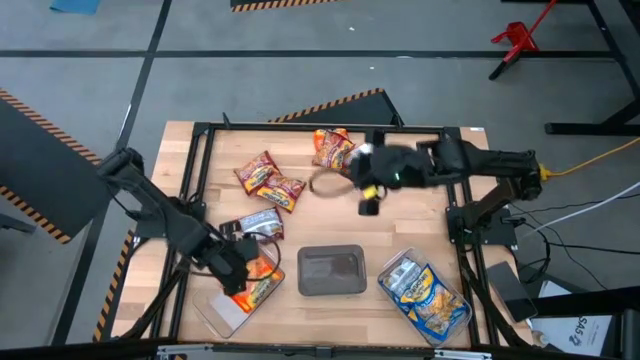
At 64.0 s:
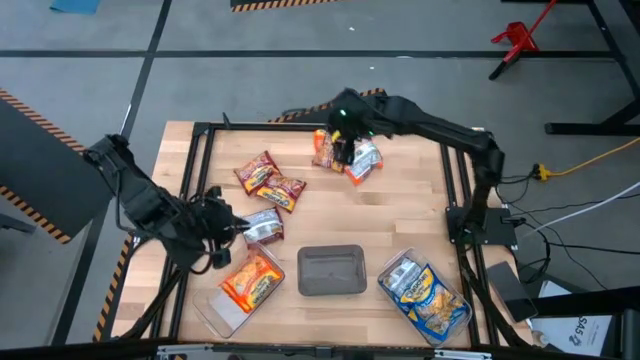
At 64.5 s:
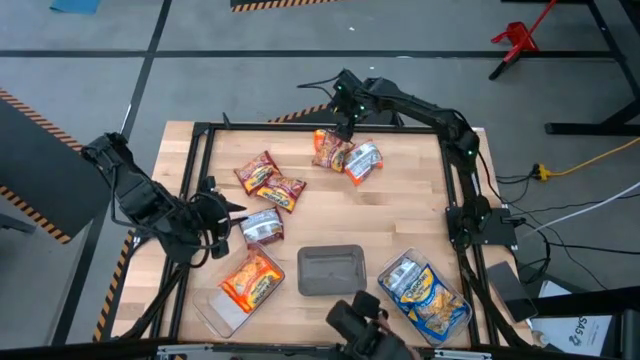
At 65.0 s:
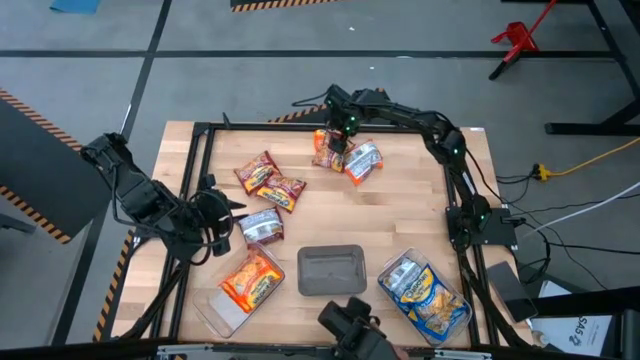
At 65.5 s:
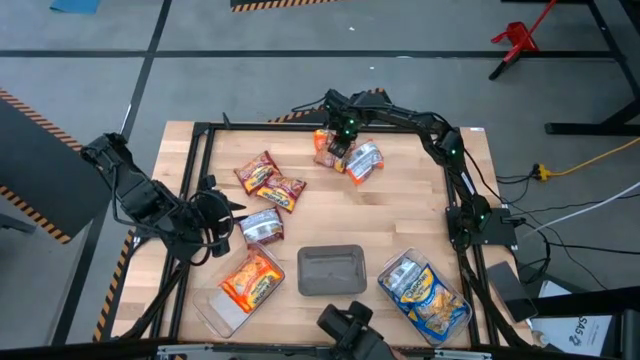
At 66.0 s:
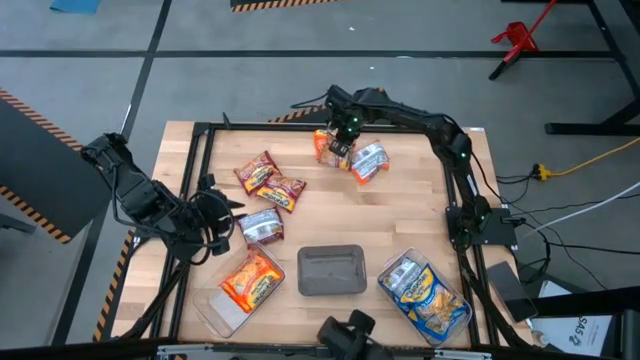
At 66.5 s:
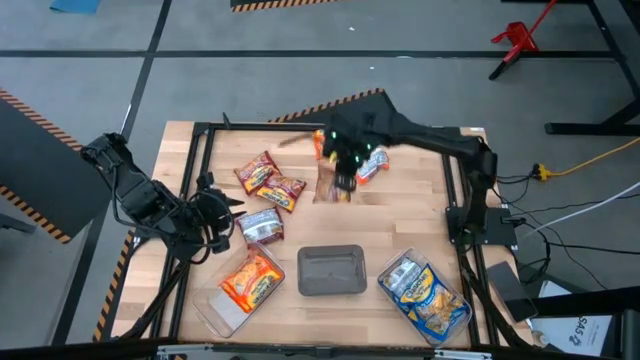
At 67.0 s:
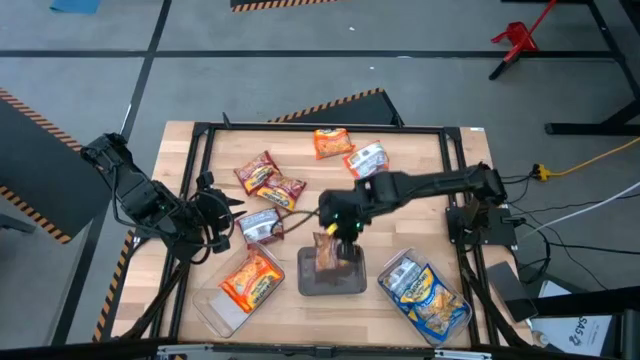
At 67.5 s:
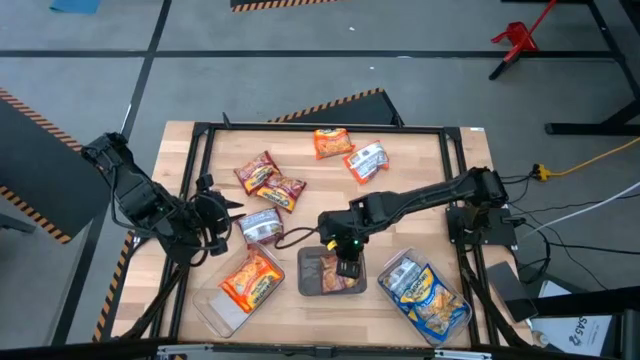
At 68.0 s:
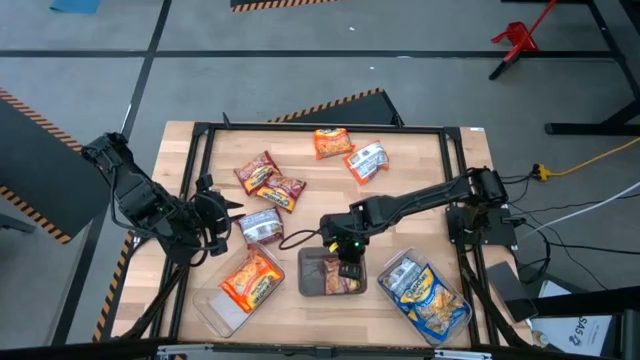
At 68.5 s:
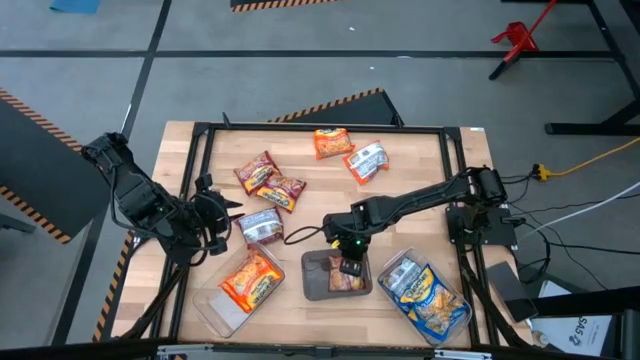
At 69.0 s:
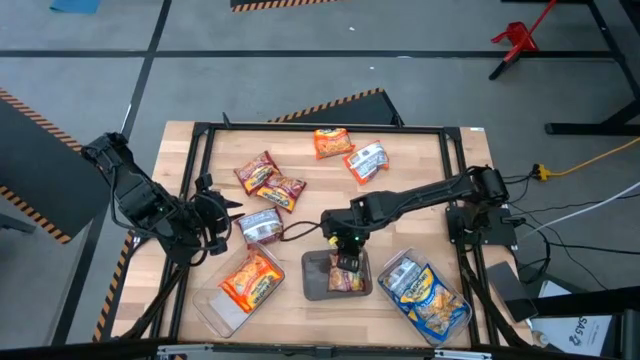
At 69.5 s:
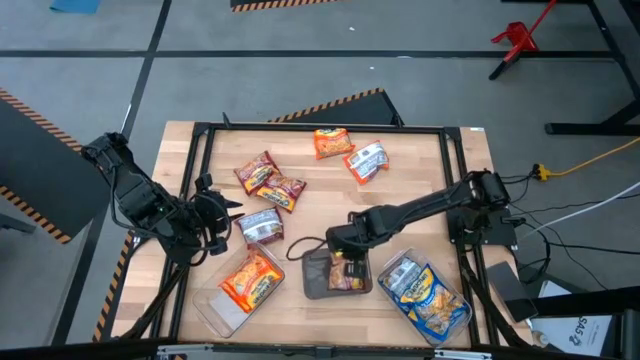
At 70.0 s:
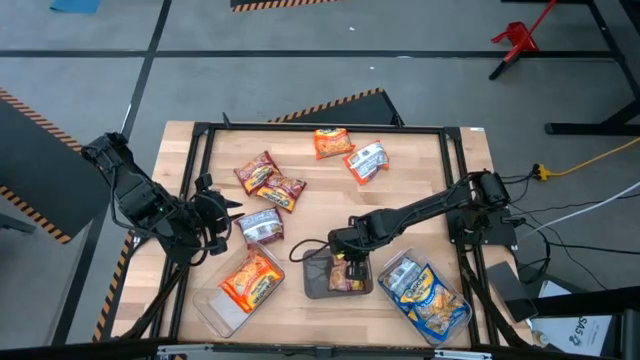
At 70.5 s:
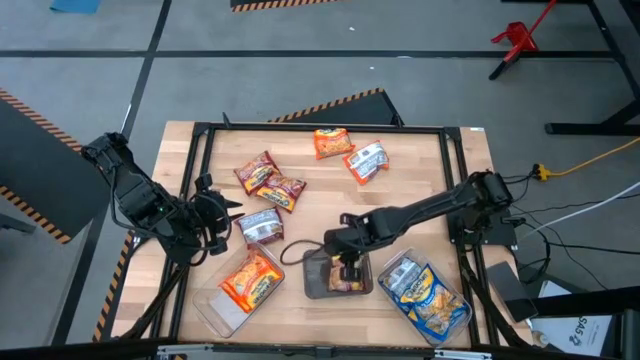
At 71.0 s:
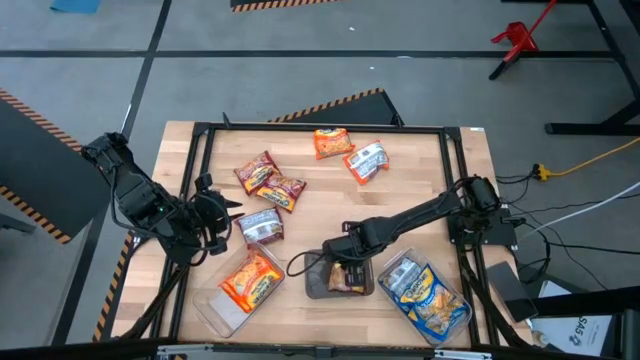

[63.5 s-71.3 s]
Task: Sort Maruchan noodles
Put the red noodle pack into the black bin

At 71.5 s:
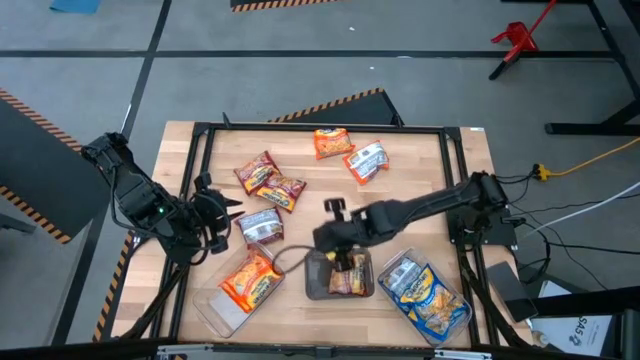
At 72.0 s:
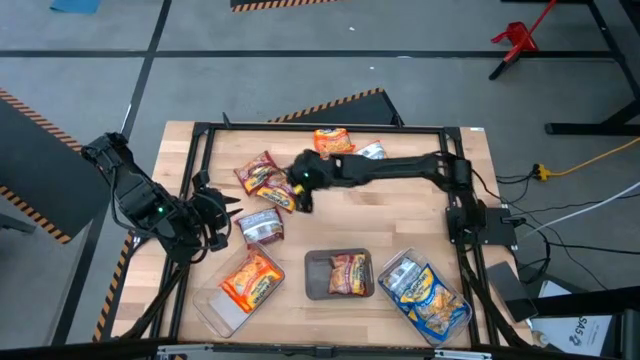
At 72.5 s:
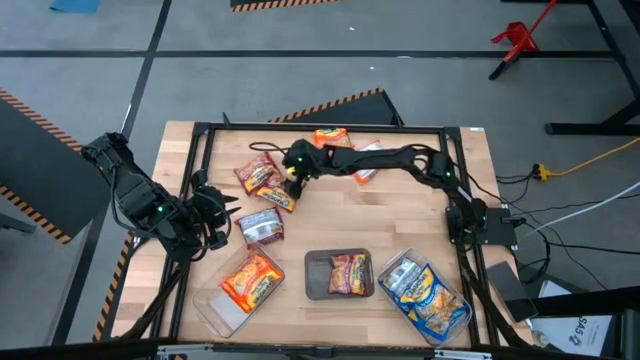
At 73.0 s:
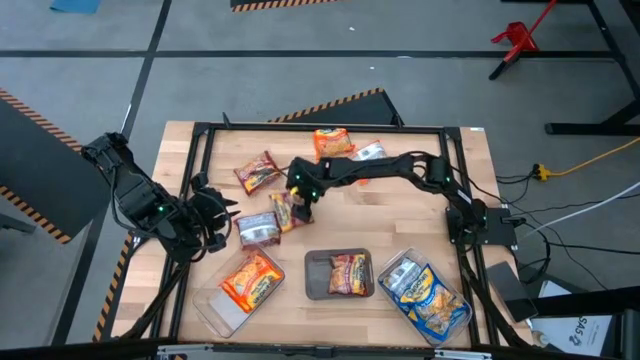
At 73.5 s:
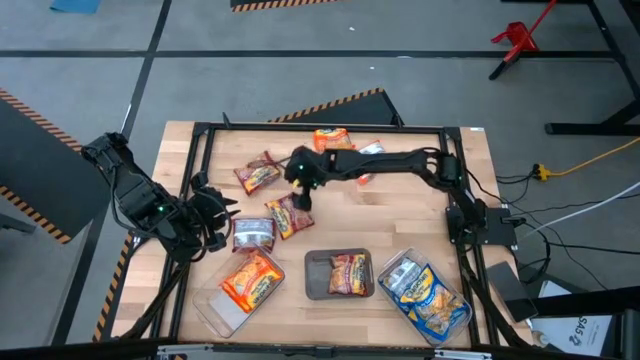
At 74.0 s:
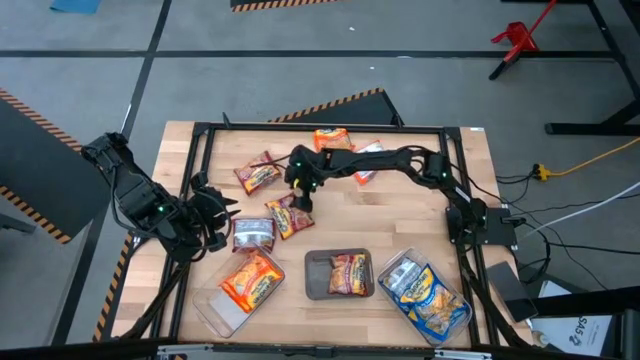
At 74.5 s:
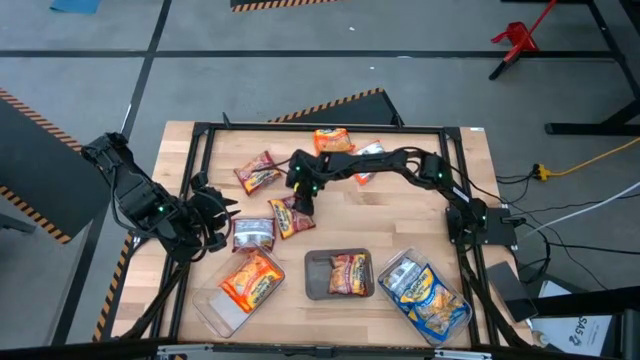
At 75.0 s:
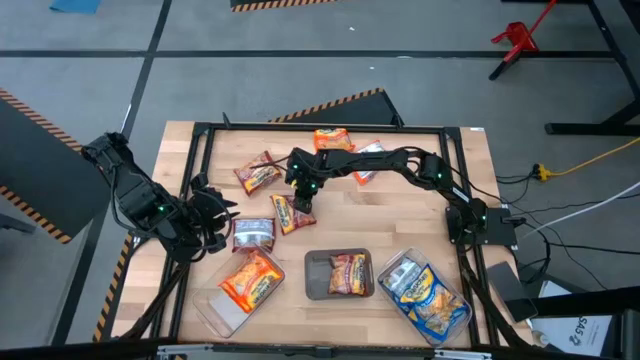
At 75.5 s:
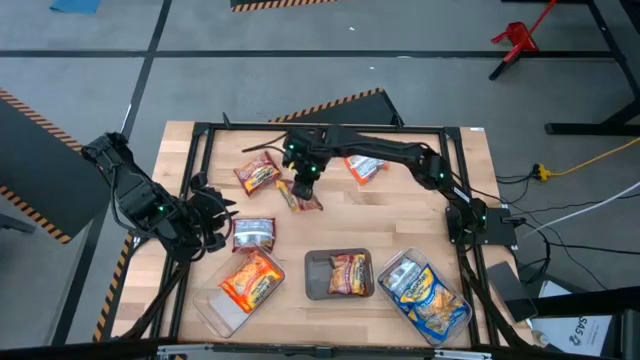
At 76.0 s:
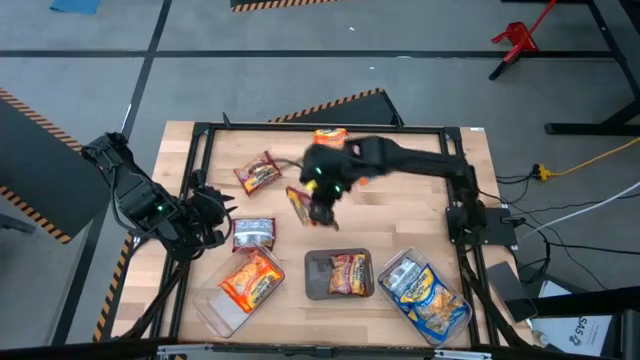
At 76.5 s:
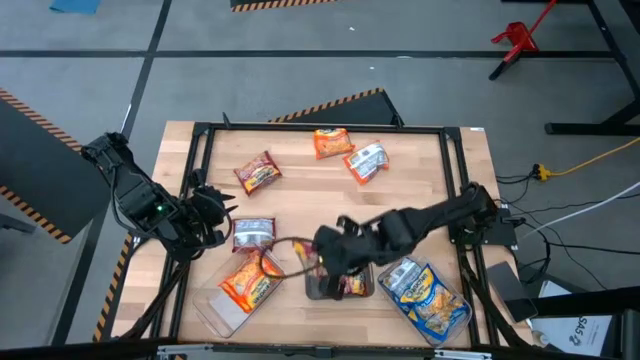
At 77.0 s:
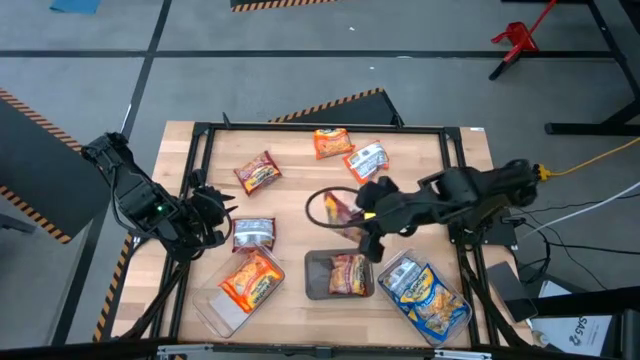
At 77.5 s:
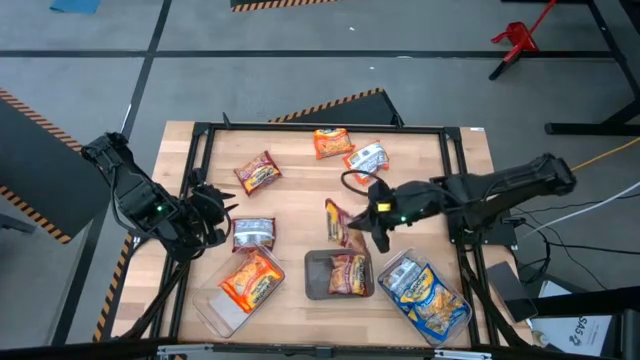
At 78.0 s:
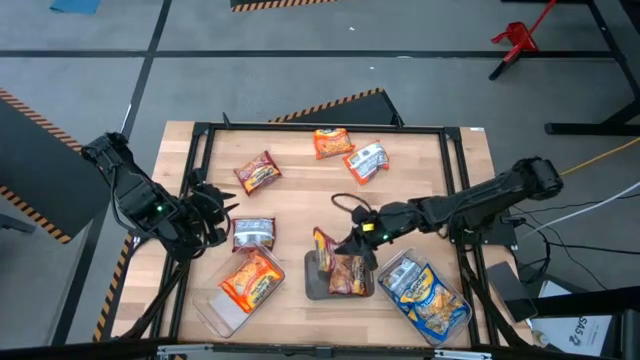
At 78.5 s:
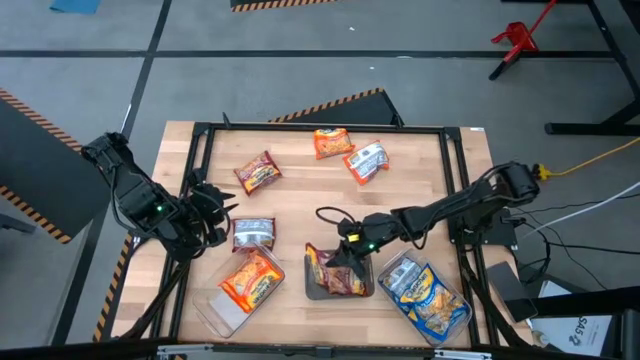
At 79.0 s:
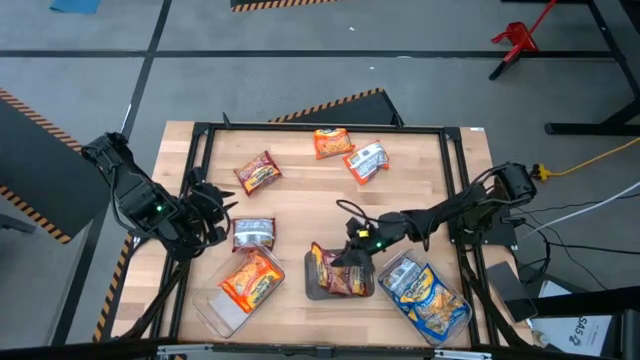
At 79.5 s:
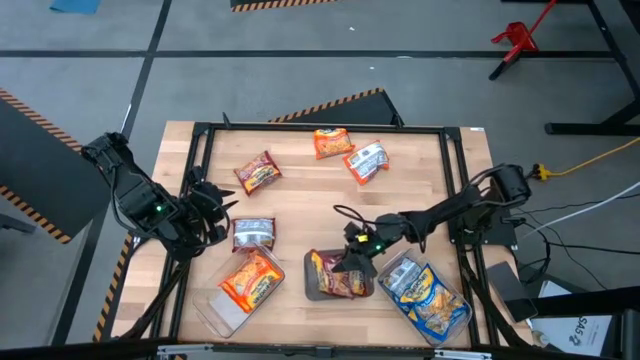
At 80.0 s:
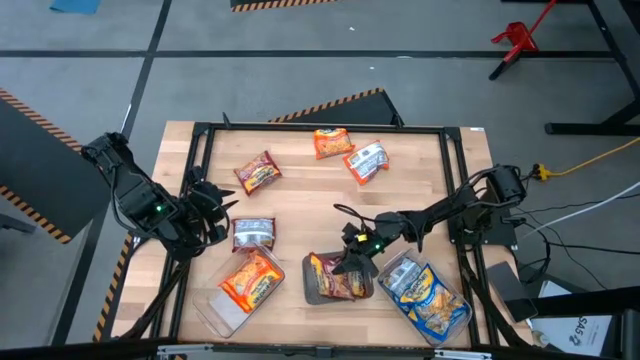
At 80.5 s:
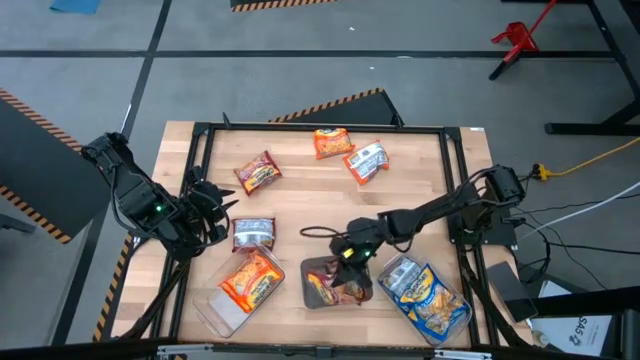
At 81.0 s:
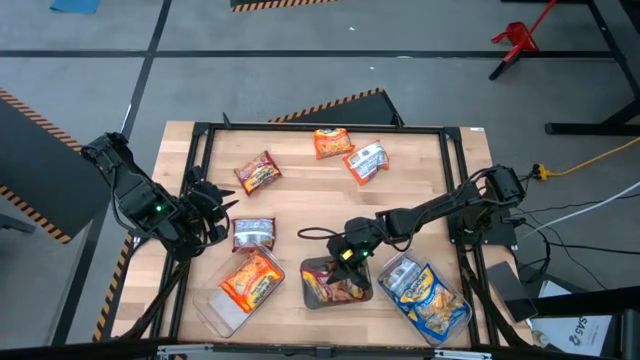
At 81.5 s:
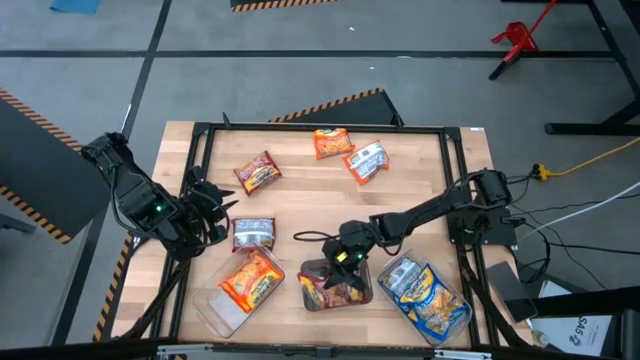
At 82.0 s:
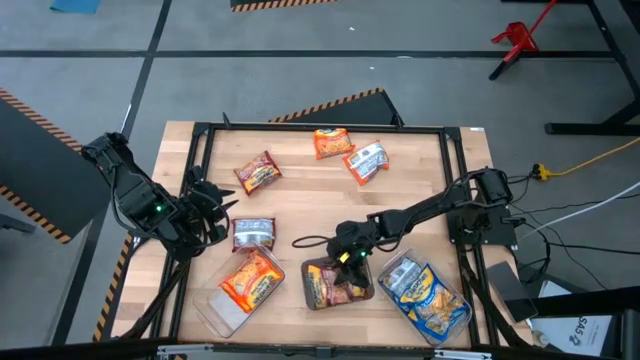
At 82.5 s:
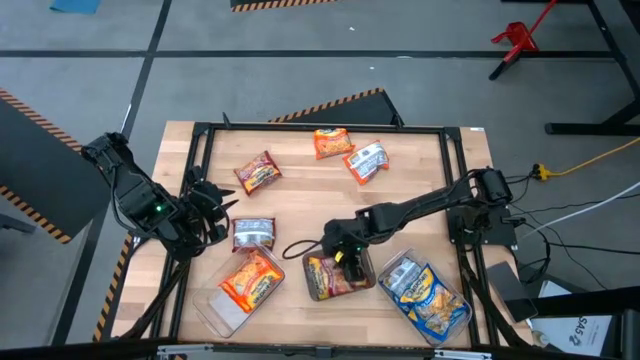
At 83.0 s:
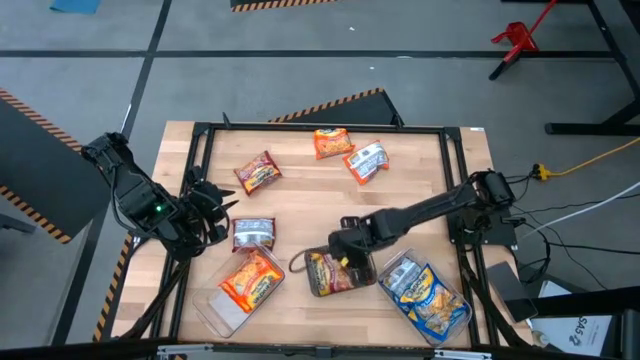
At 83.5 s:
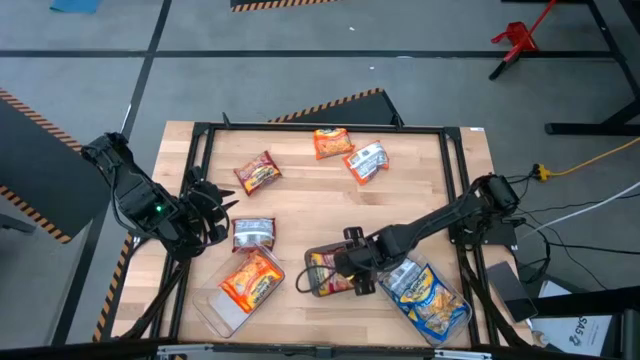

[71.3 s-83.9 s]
Put the red noodle pack into the black bin

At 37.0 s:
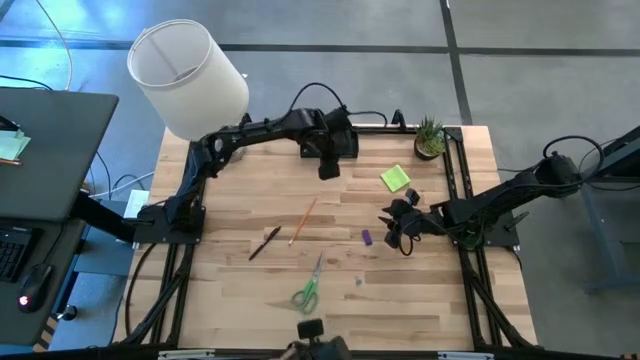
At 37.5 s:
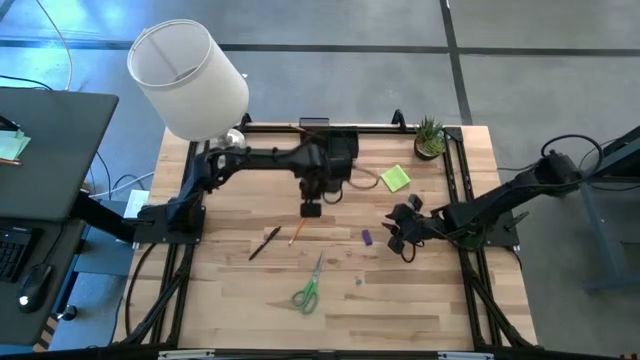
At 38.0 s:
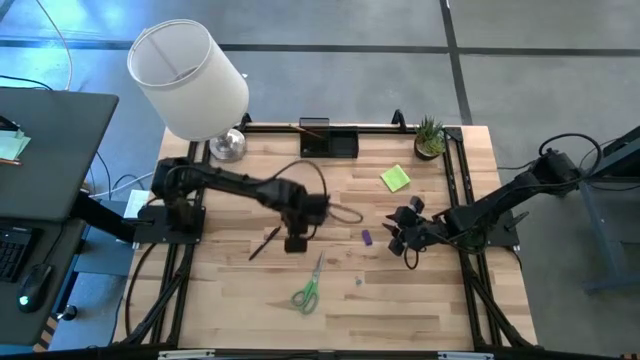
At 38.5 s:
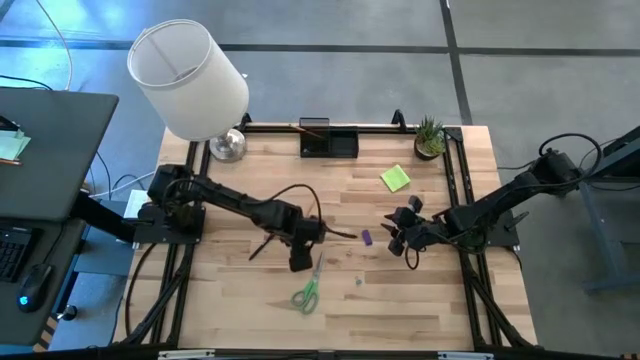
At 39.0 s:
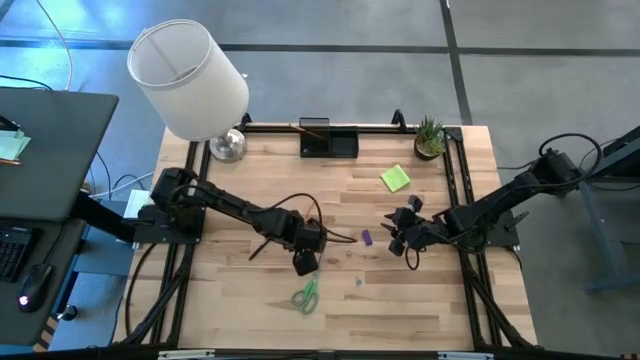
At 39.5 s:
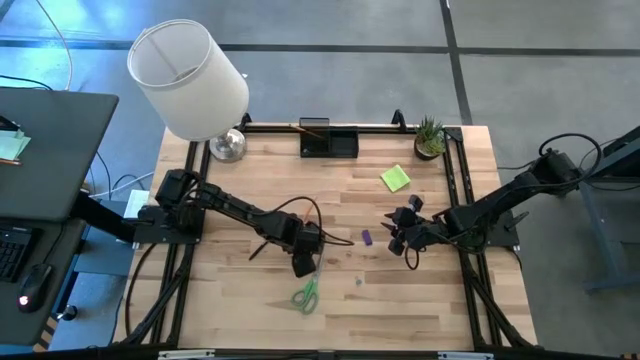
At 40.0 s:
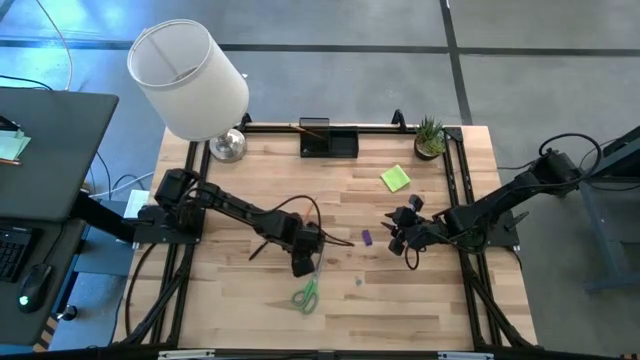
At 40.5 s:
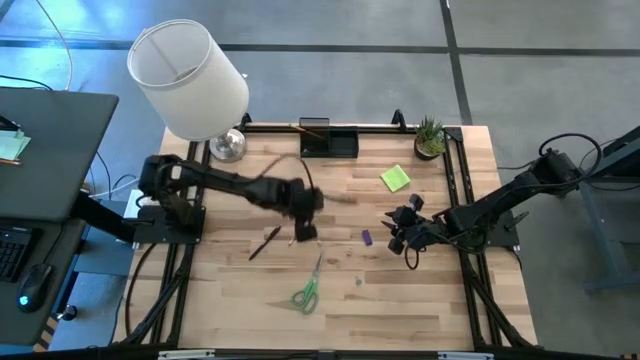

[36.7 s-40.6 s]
Task: Pick and place office supplies into organizer
Put the yellow binder clip into the black desk organizer
